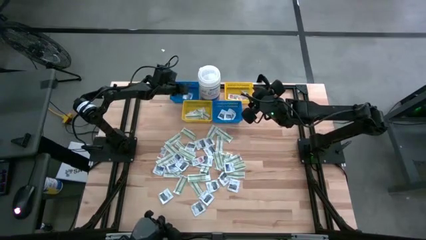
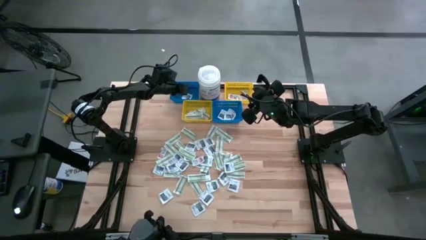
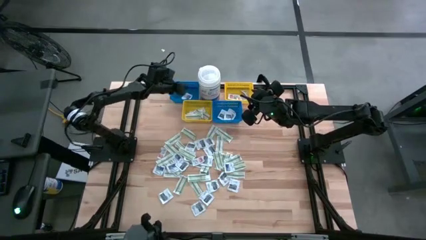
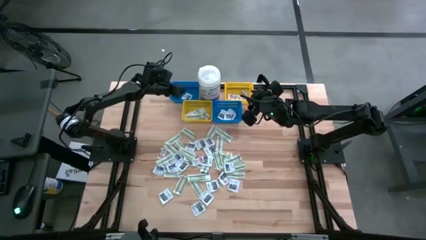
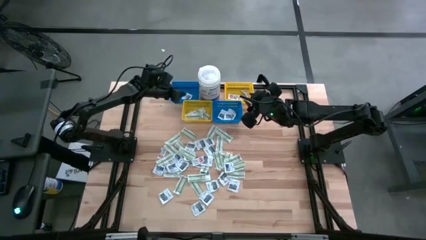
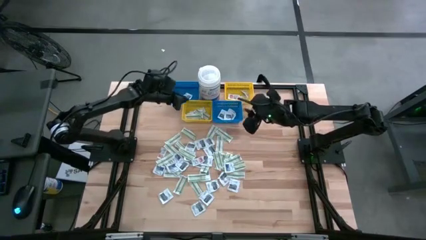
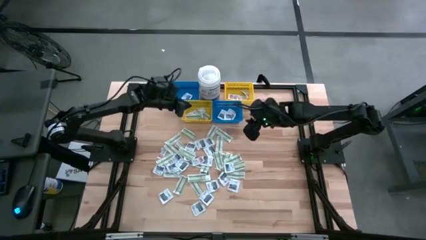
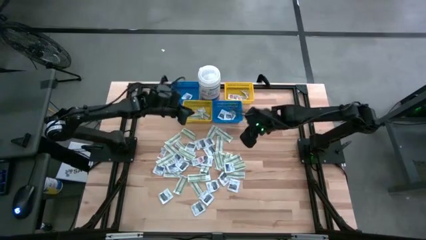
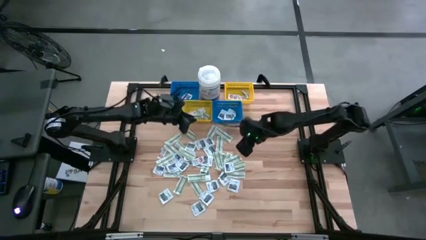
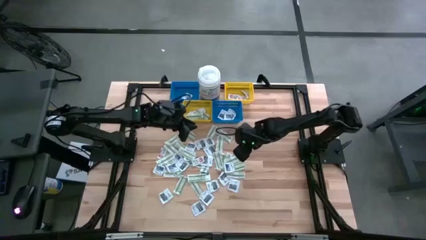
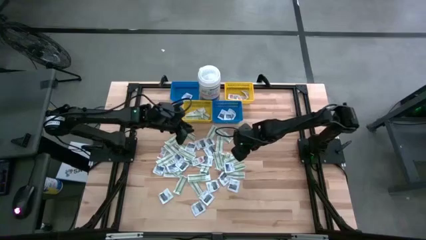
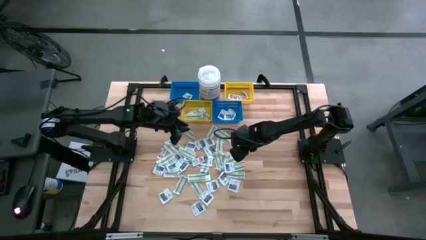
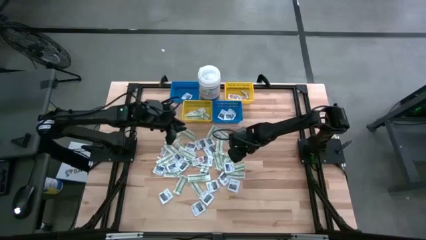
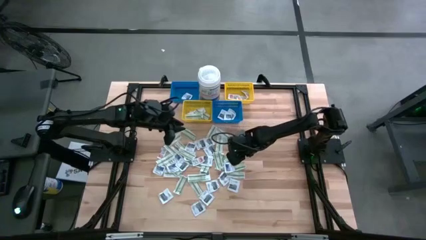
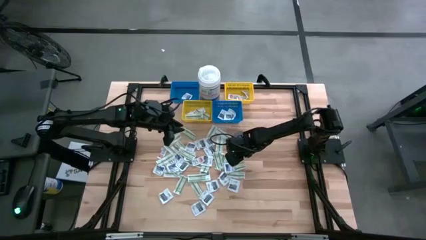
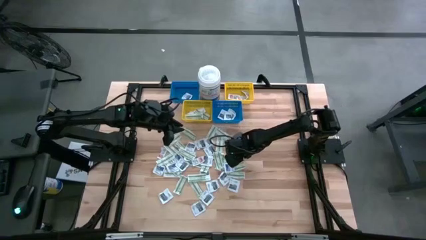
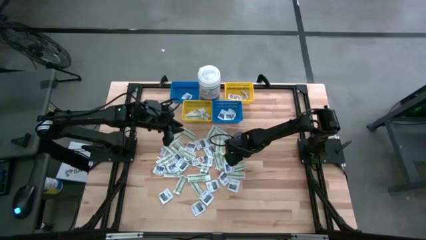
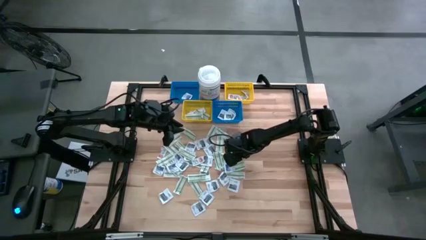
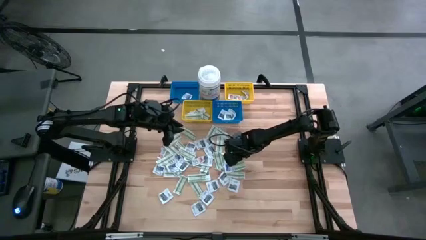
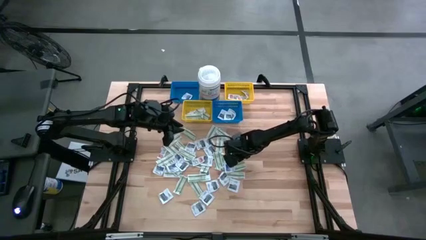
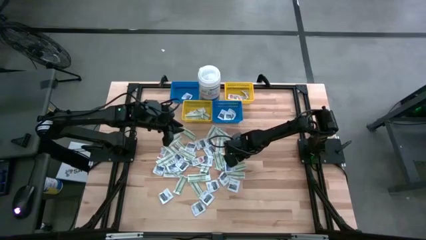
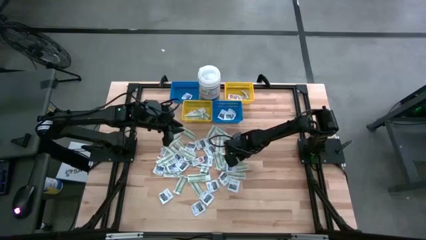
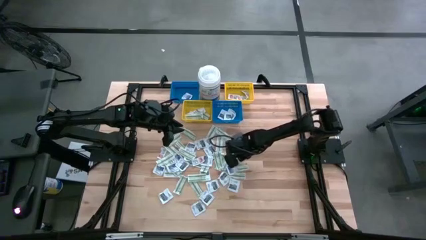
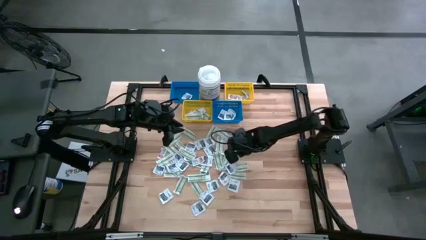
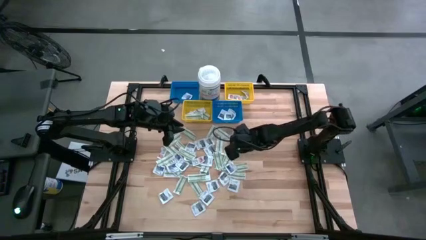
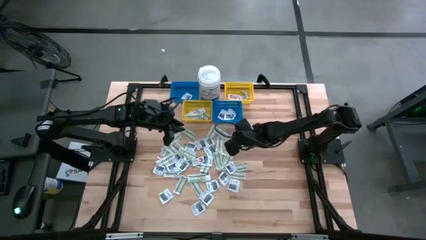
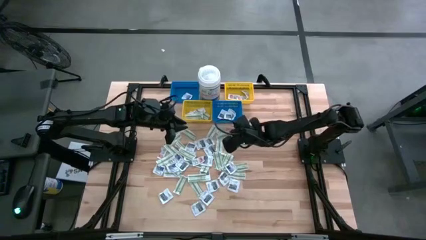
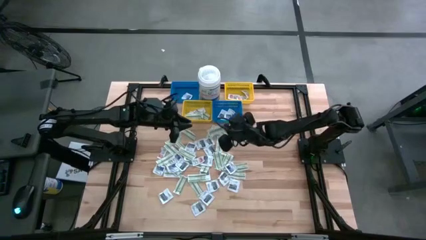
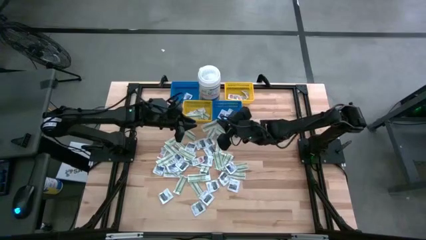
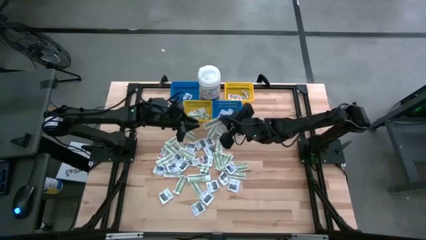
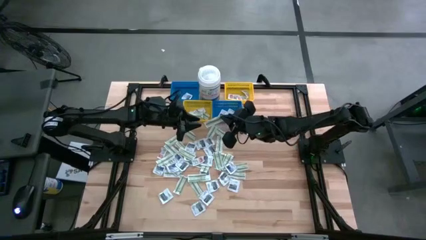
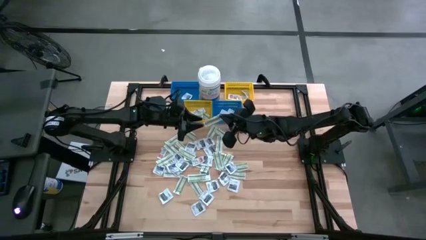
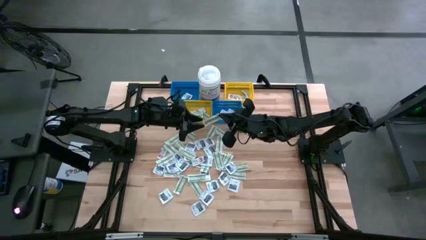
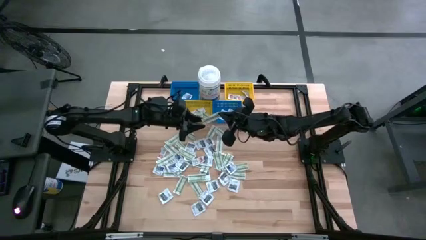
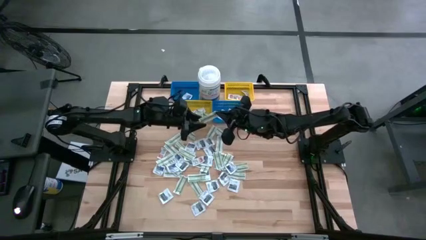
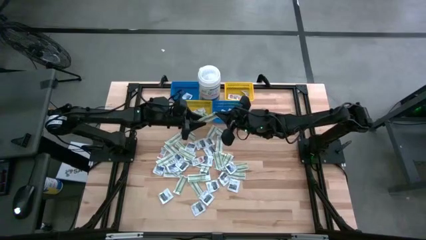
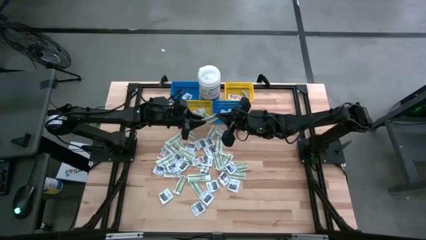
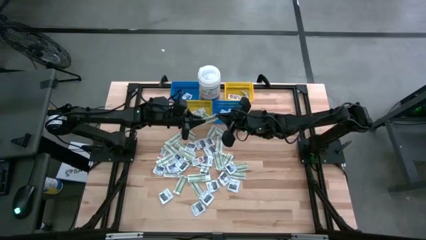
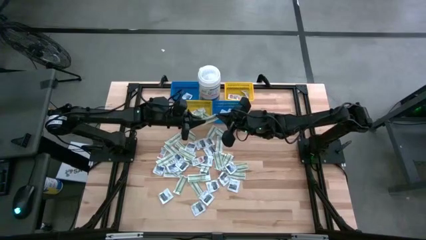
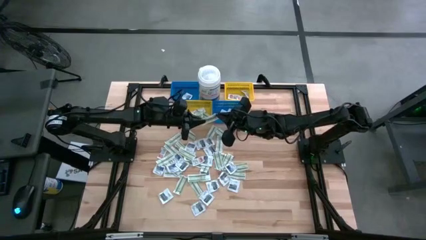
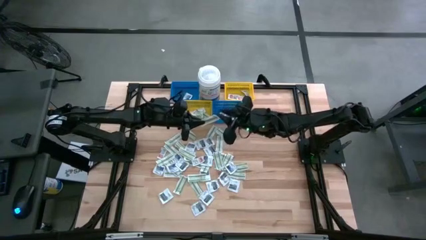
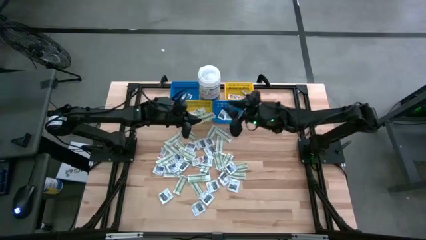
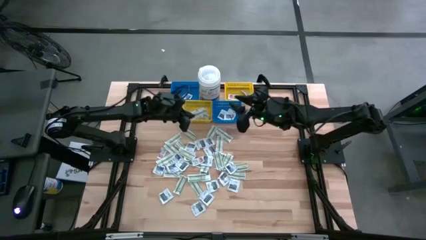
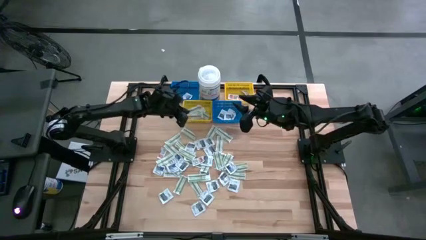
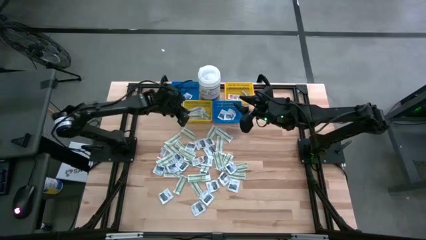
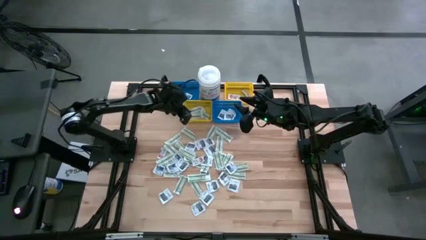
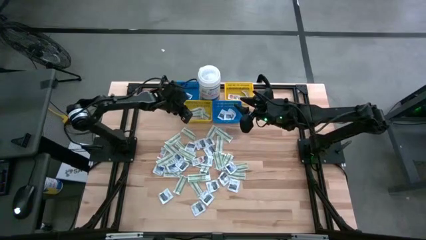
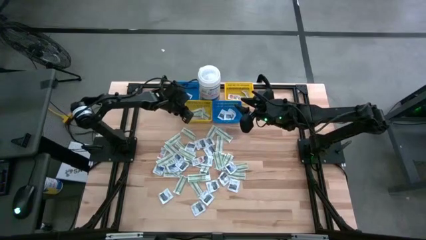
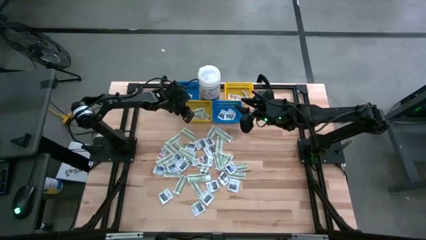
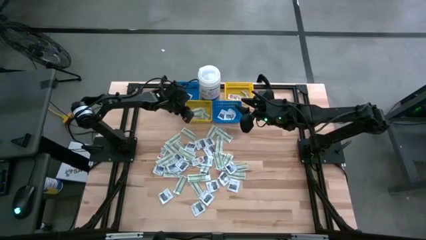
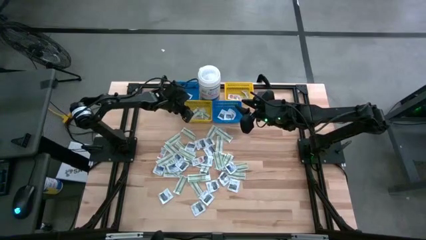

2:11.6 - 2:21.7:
Task: Pick & Place First Aid Supplies
Put the green bandage pad into the left yellow bin

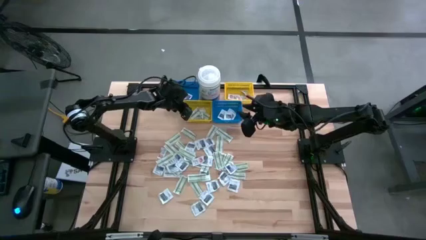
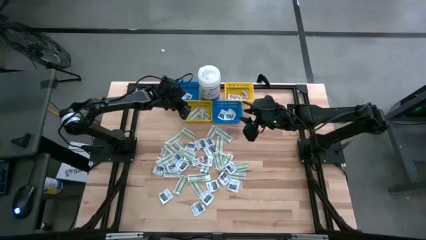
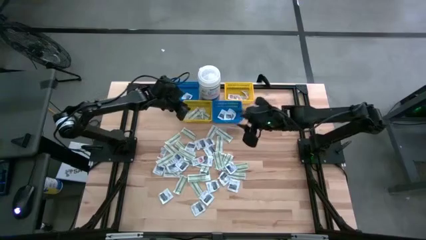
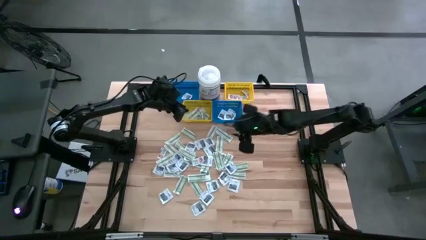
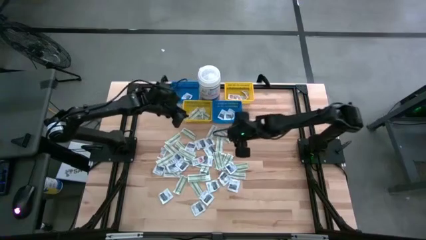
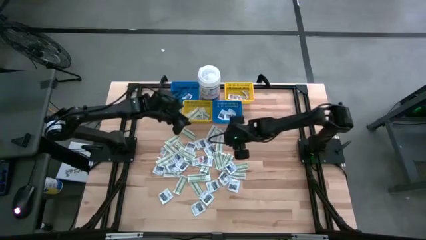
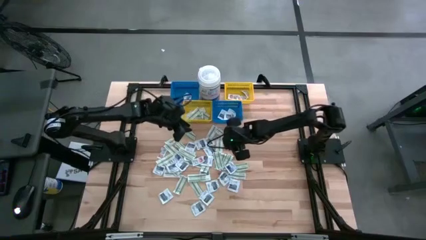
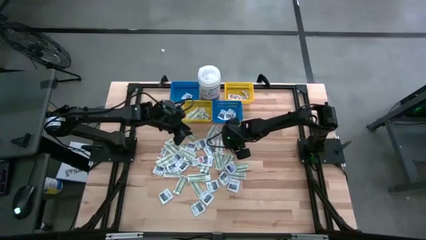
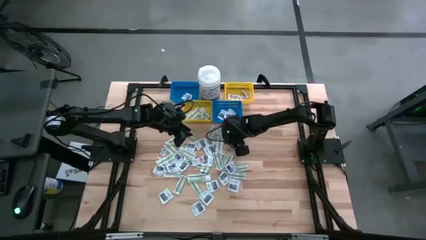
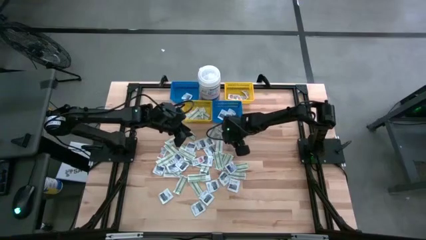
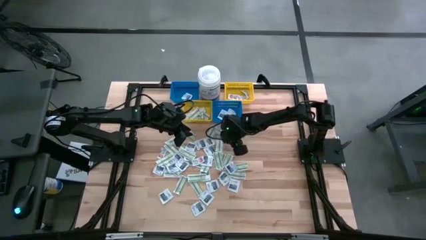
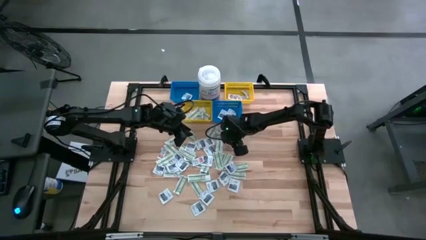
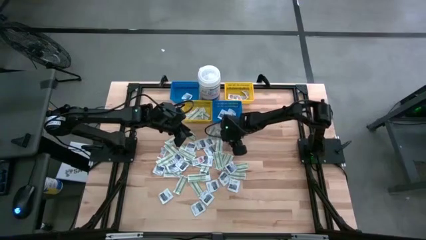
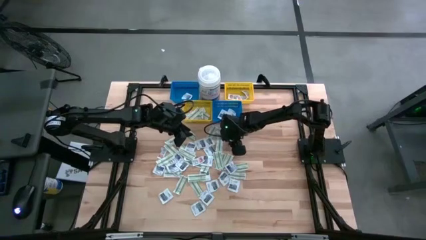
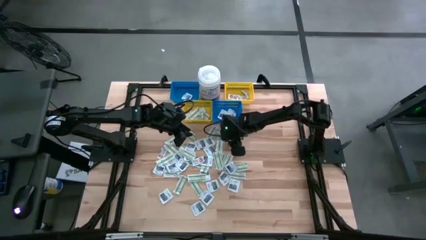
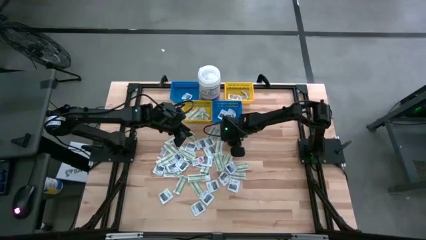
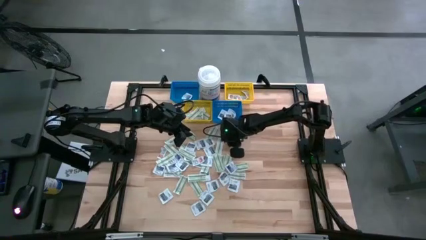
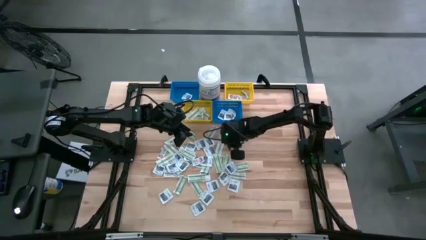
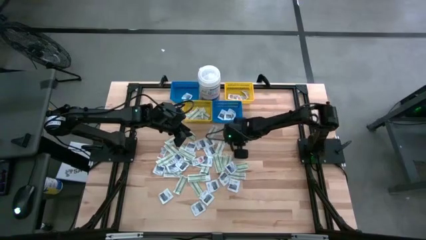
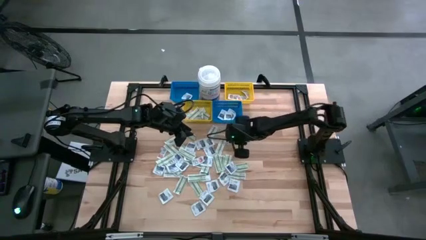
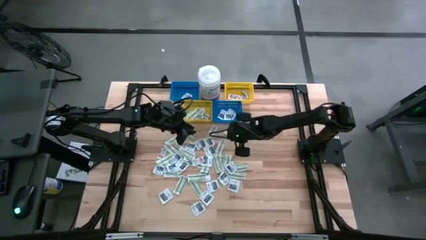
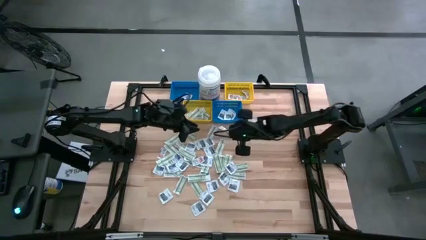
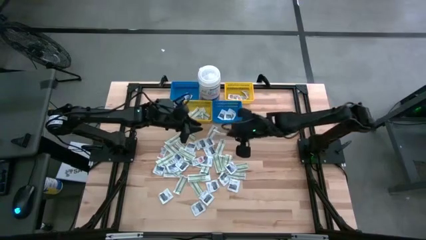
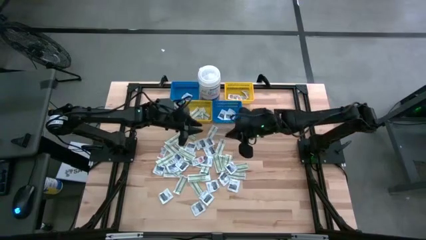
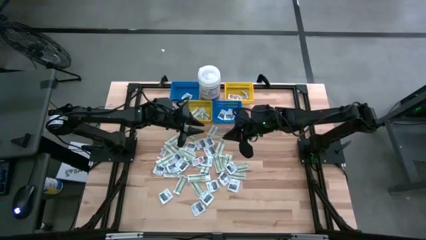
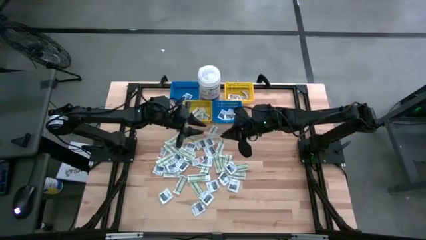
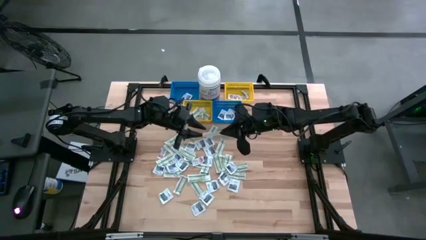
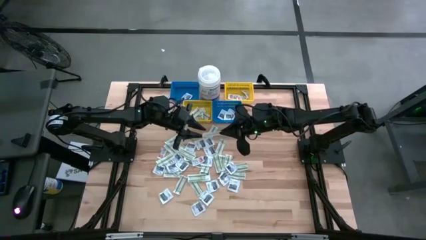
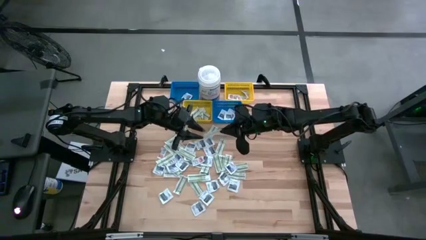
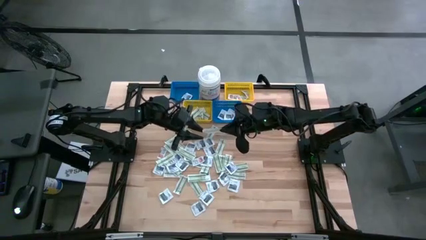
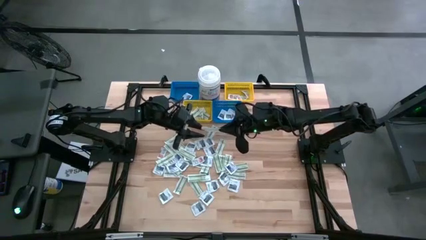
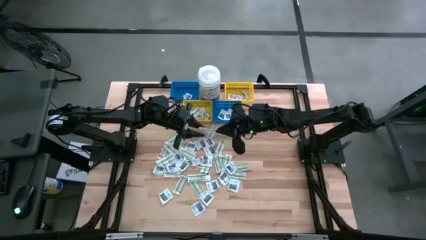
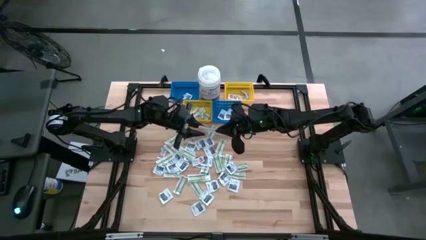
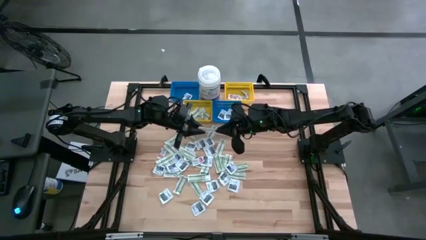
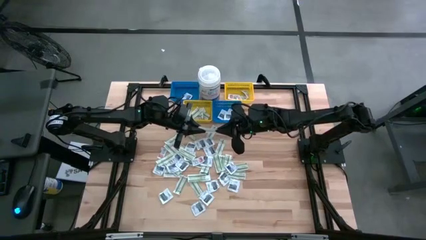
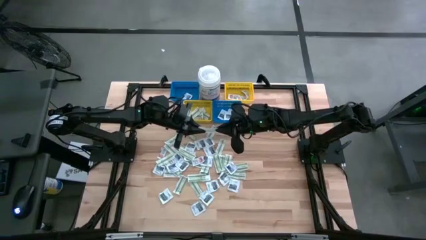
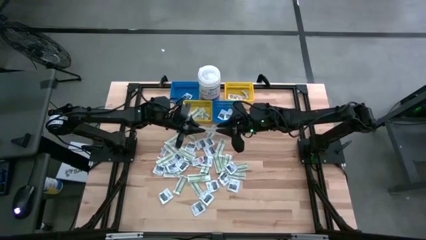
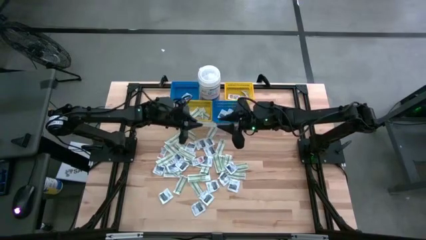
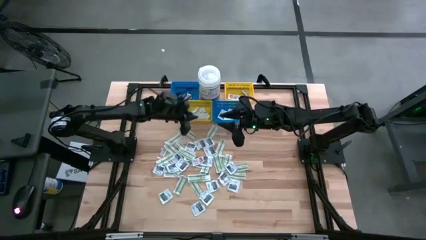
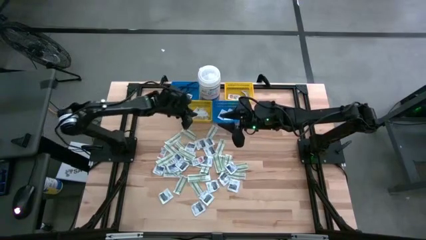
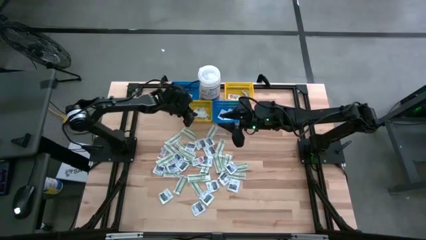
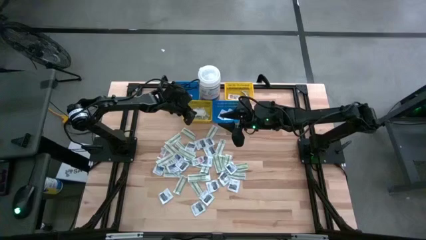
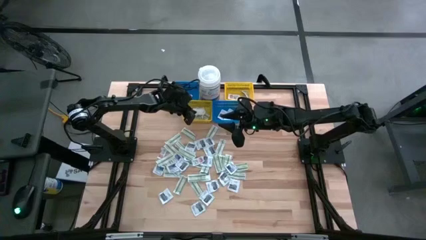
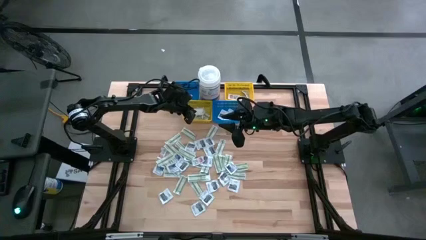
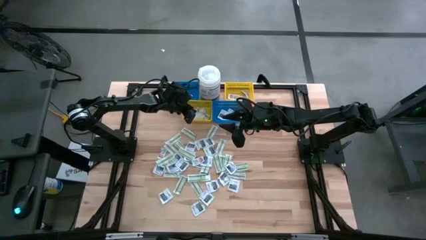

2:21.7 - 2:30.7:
Put the green bandage pad into the left yellow bin
